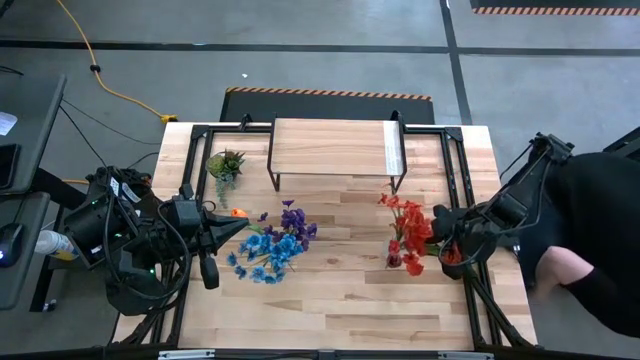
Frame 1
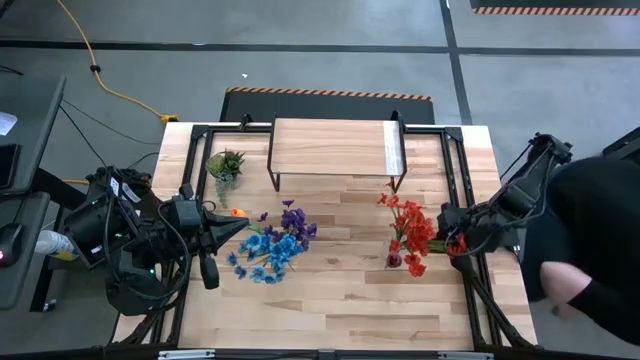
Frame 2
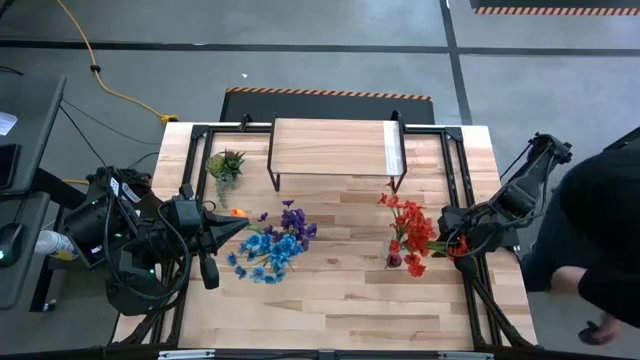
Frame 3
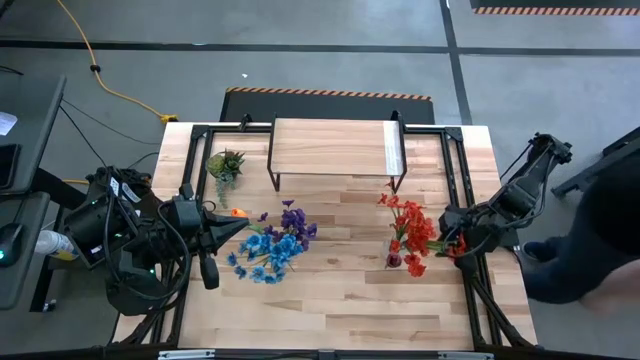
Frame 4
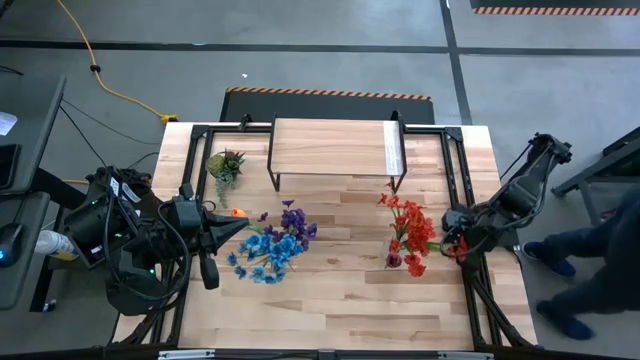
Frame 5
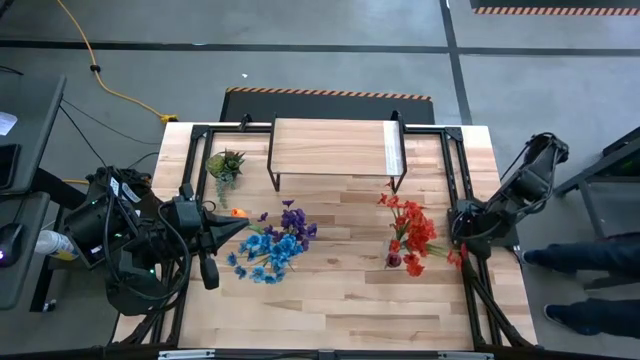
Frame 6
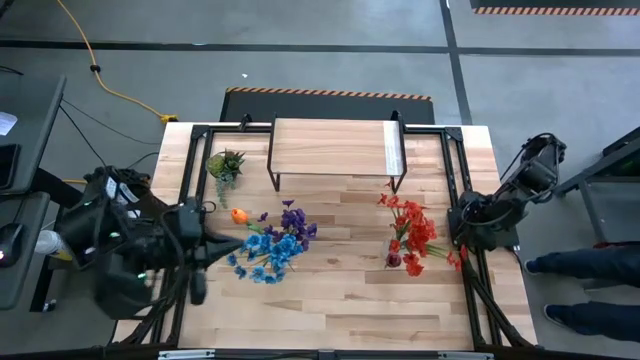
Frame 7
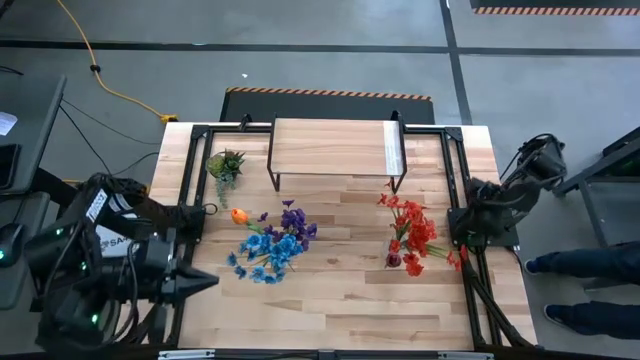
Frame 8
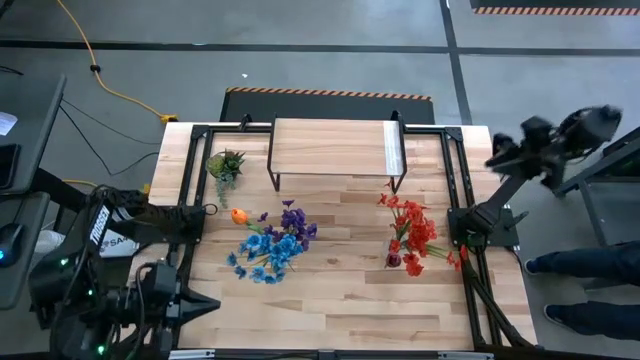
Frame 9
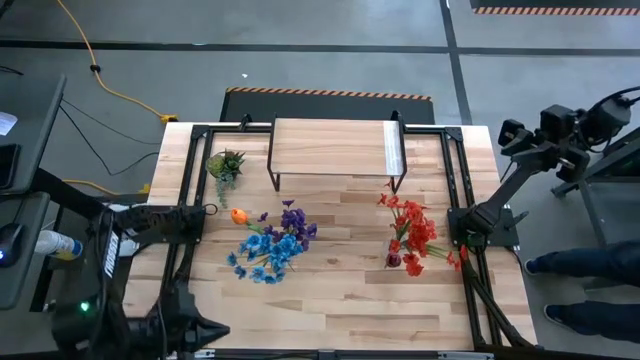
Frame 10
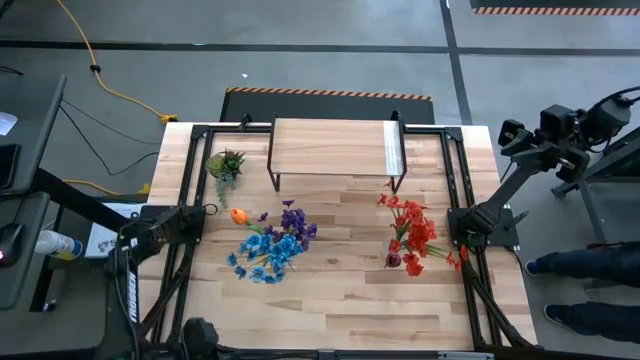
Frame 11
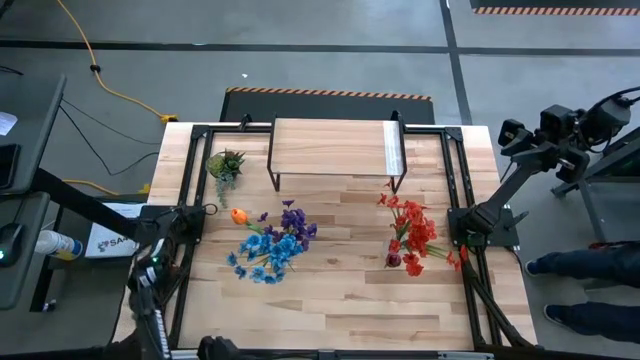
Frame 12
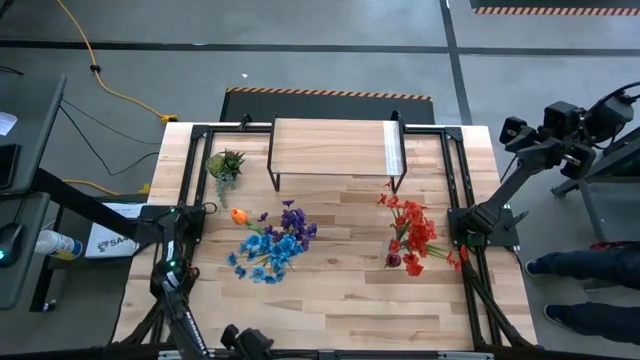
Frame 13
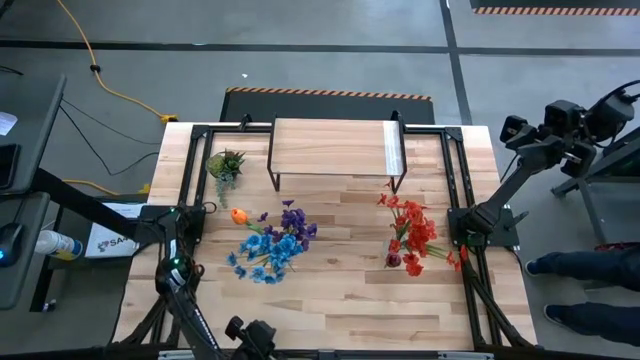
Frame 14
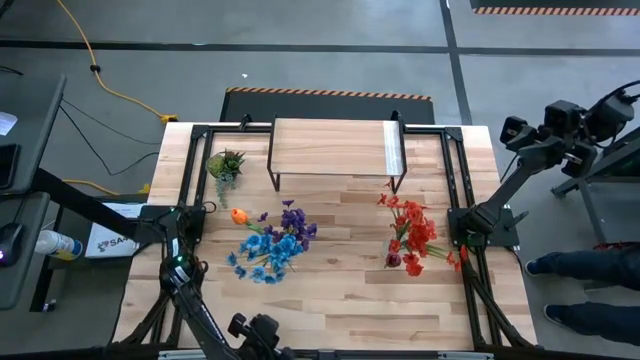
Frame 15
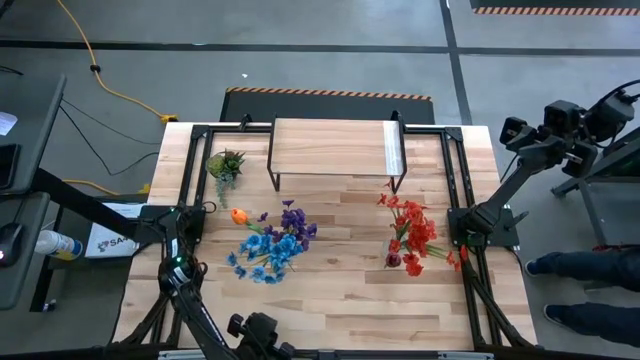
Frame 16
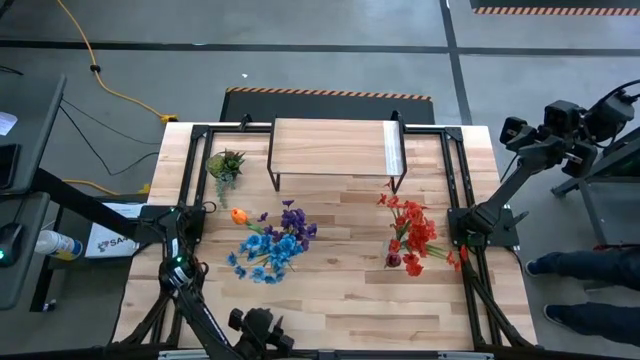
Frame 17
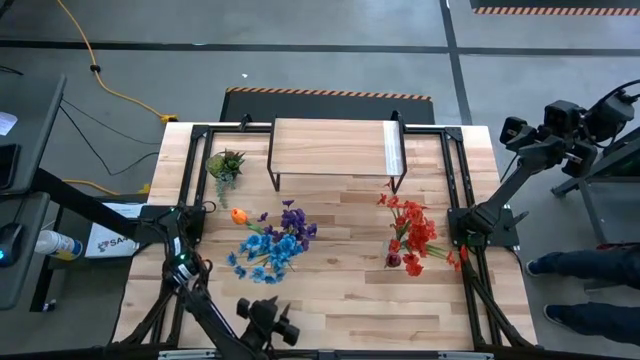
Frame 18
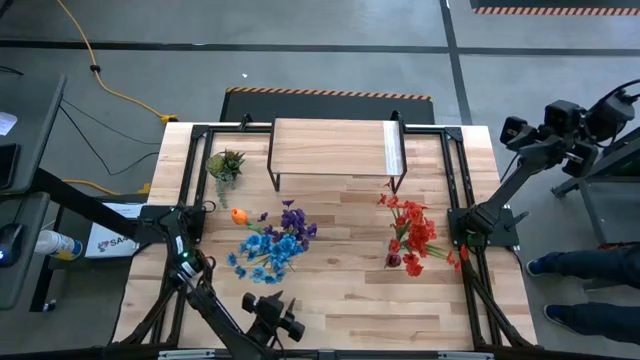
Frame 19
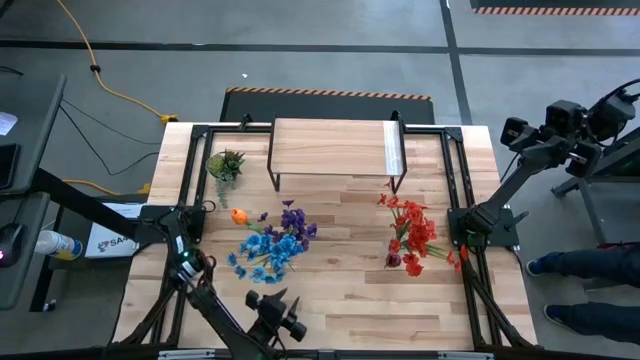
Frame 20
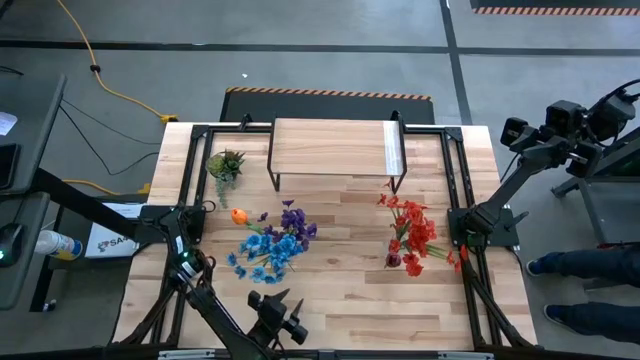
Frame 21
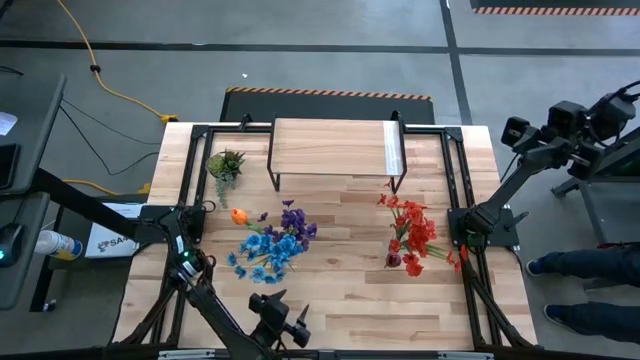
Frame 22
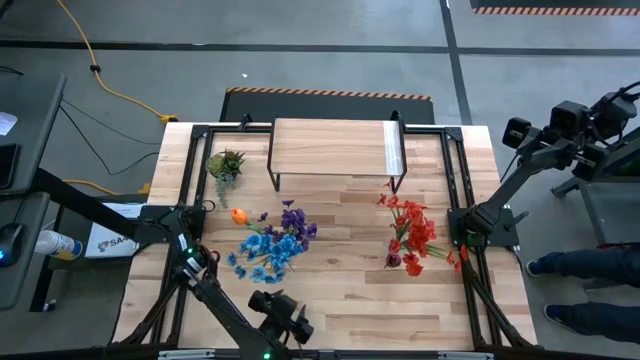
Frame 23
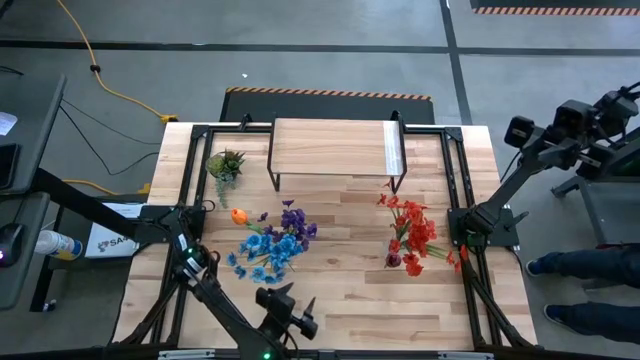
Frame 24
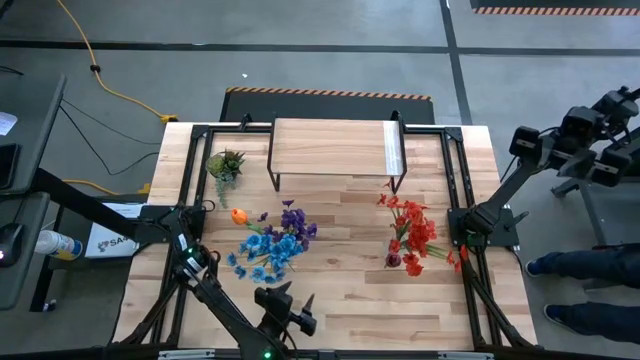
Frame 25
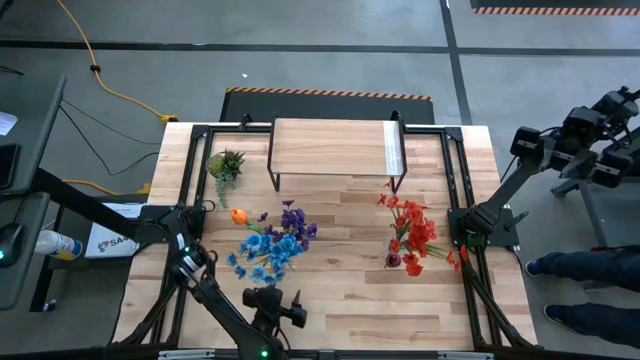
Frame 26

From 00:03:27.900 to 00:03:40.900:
Task: Pick and place flowers into a vace then onto a shelf
Put the left flowers transparent vase on the shelf

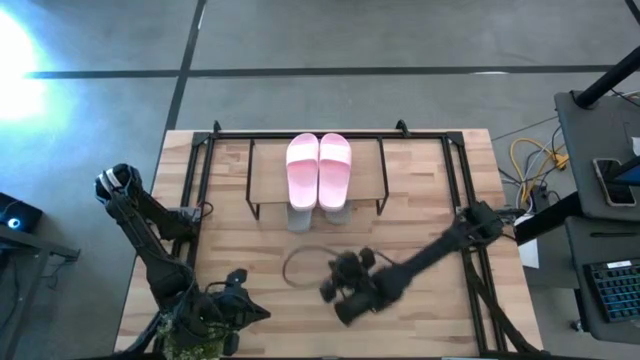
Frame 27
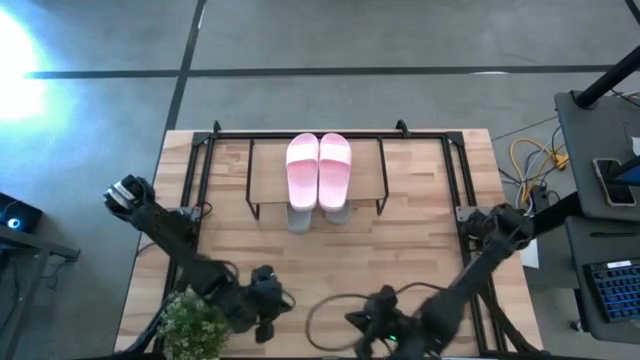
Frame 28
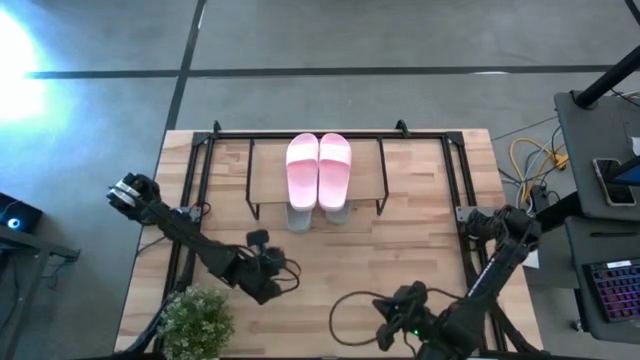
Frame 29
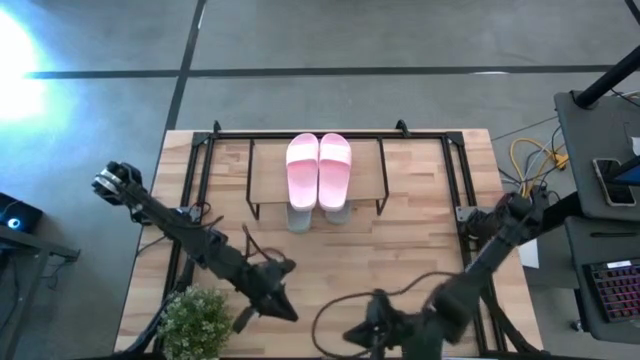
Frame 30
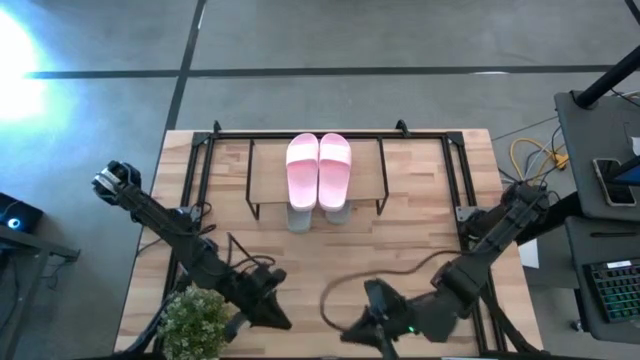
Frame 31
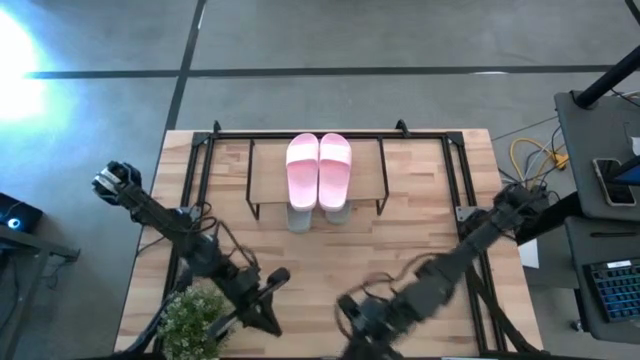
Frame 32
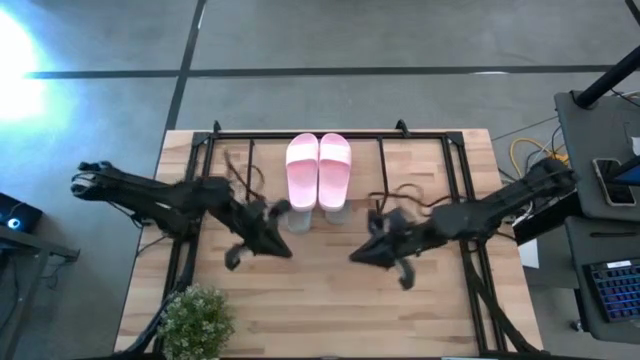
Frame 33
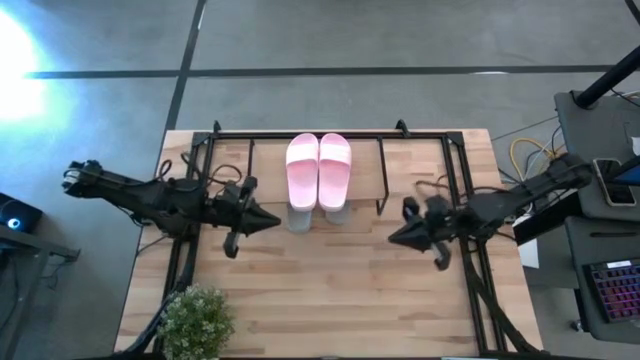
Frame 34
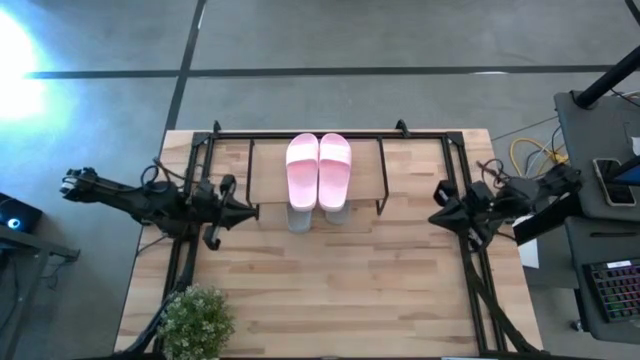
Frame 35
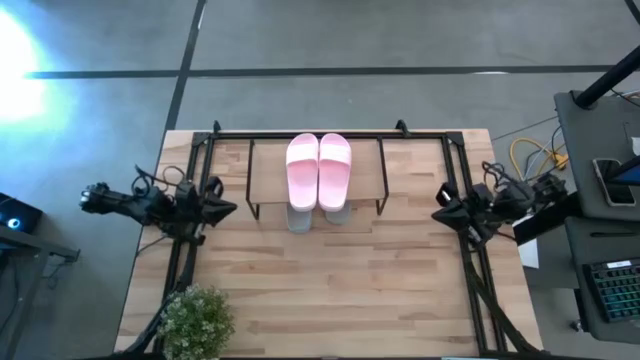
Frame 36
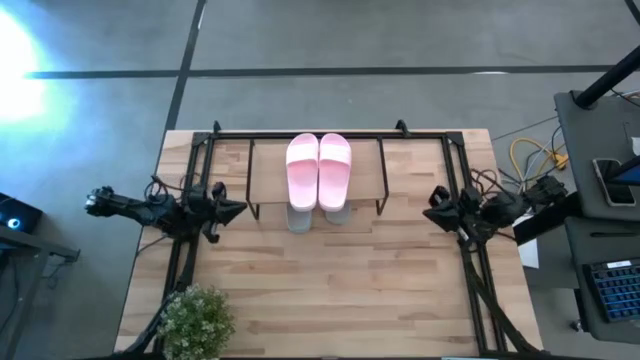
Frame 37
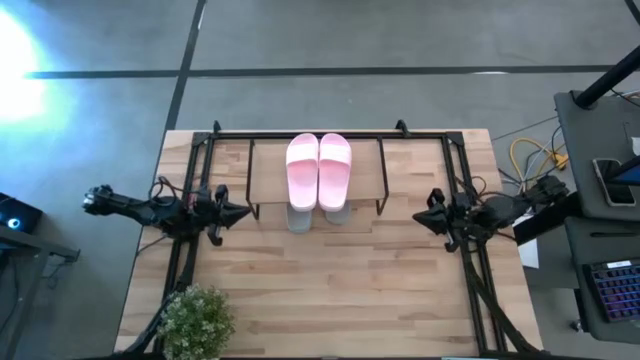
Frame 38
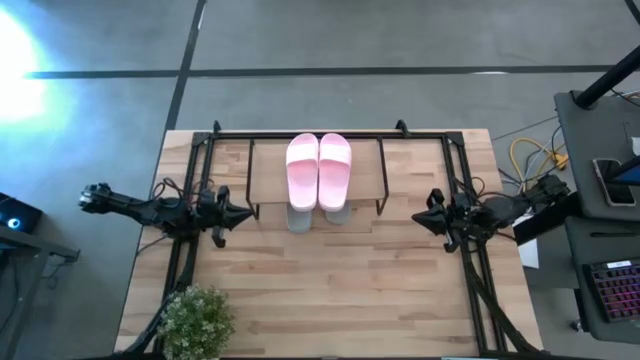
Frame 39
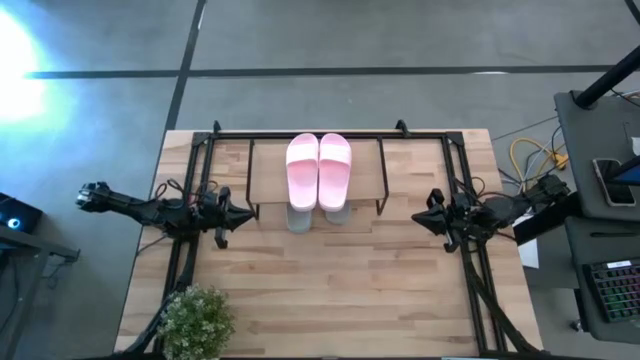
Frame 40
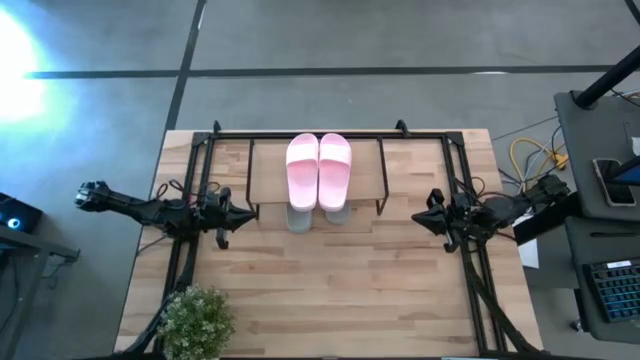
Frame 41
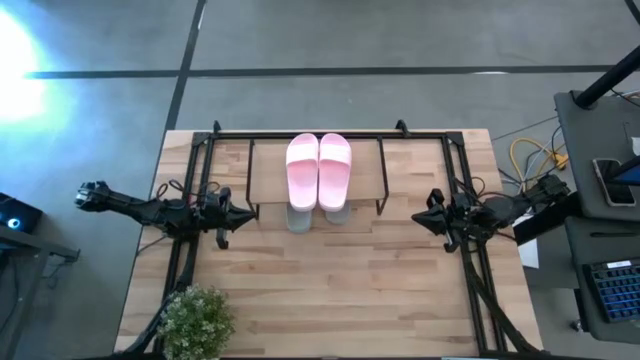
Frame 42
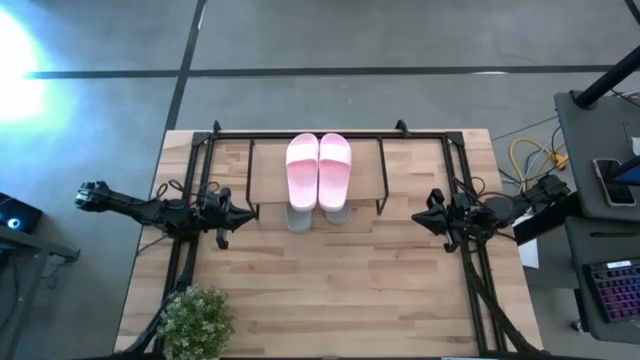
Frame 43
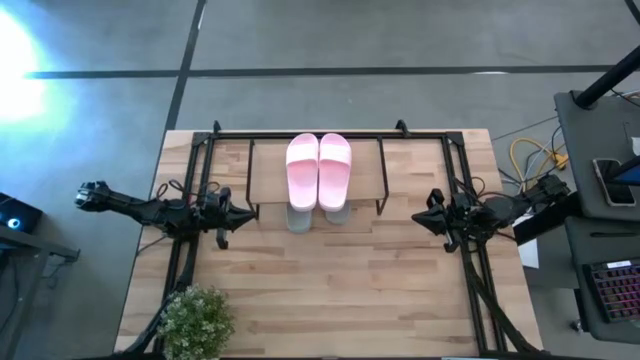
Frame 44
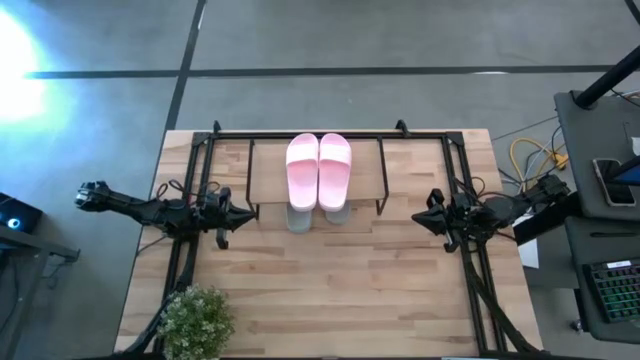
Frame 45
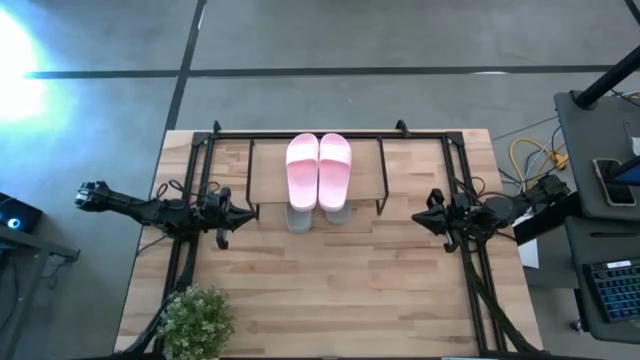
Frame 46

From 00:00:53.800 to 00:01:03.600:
Task: Pick and place slides into the shelf
Return to Home Position
